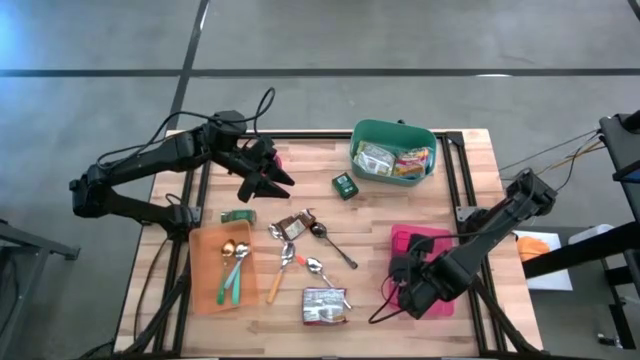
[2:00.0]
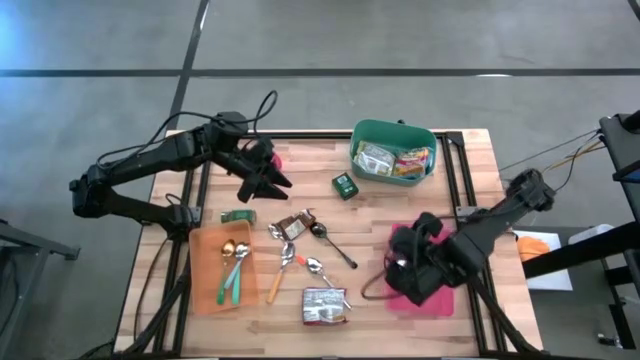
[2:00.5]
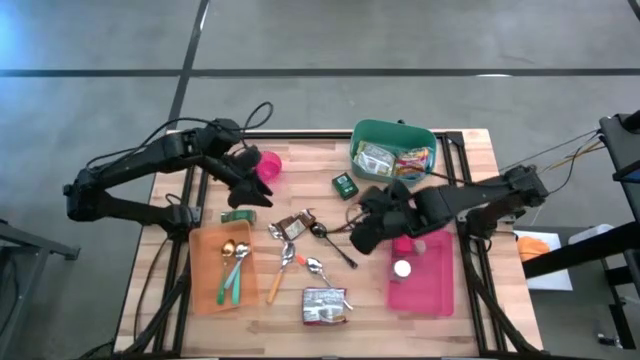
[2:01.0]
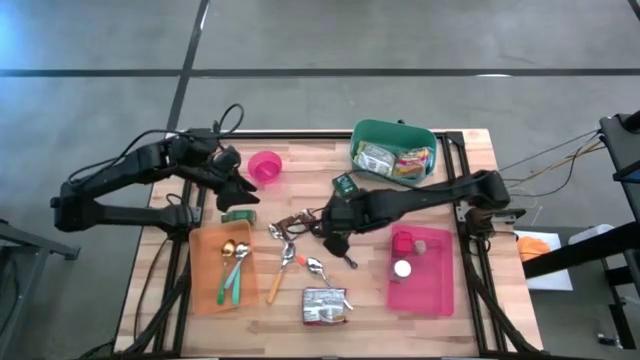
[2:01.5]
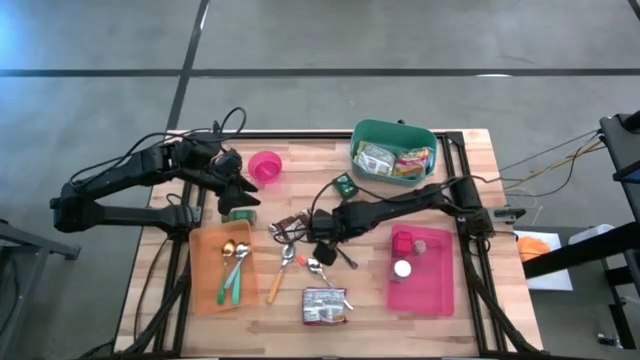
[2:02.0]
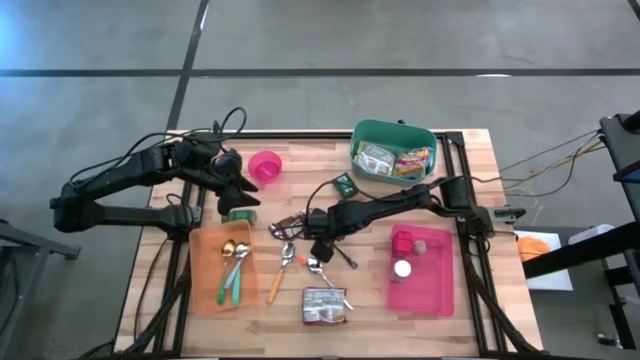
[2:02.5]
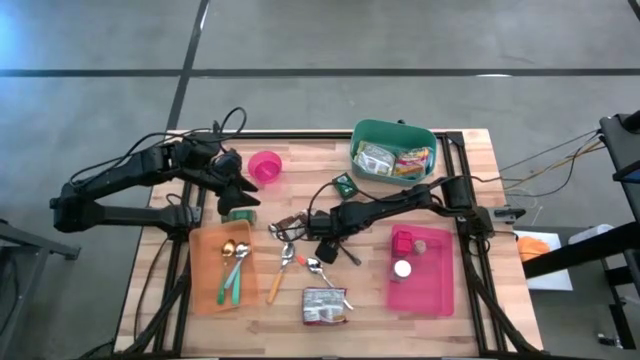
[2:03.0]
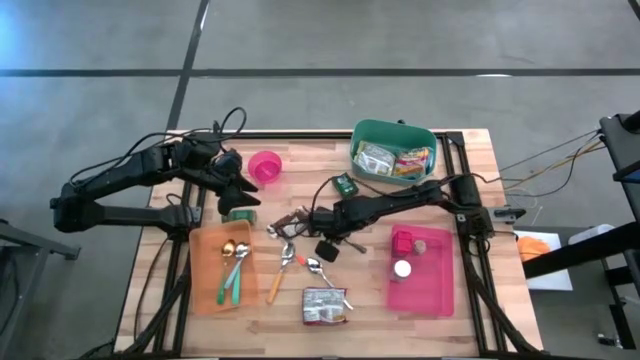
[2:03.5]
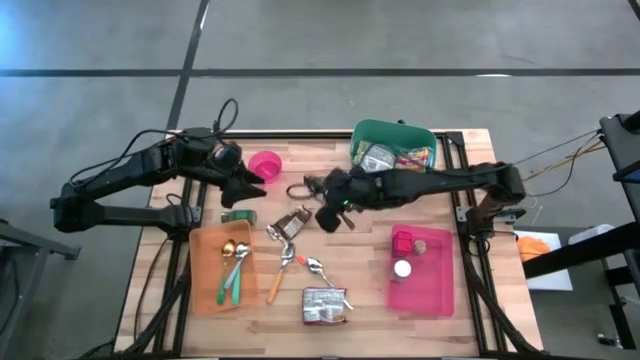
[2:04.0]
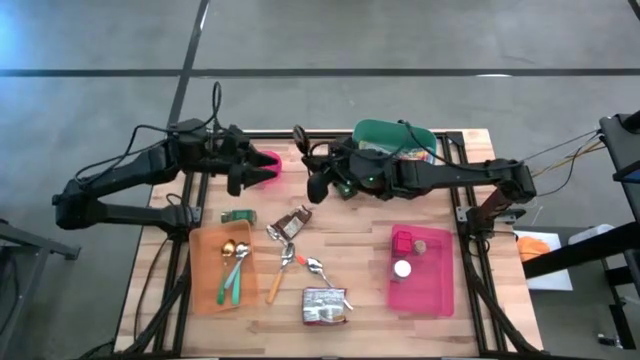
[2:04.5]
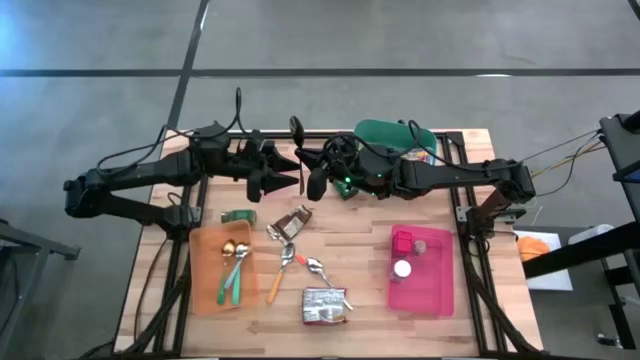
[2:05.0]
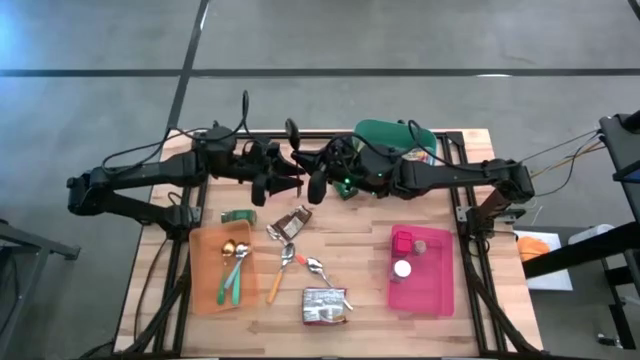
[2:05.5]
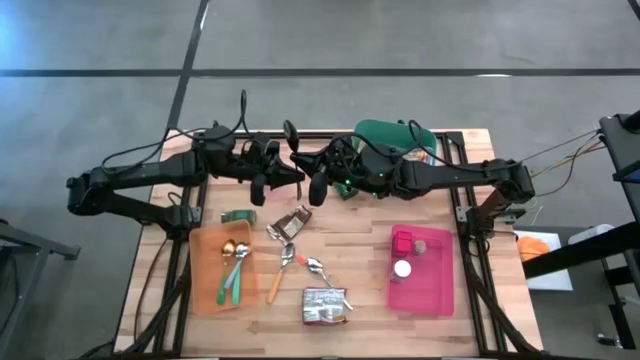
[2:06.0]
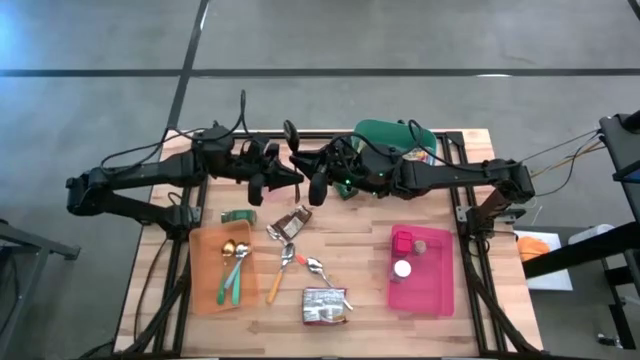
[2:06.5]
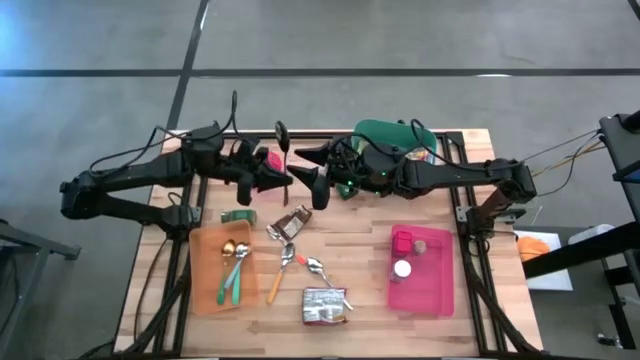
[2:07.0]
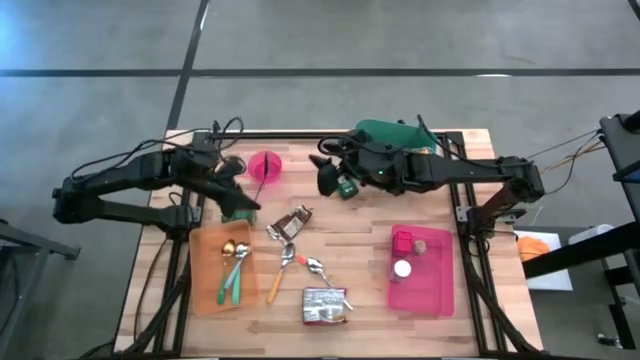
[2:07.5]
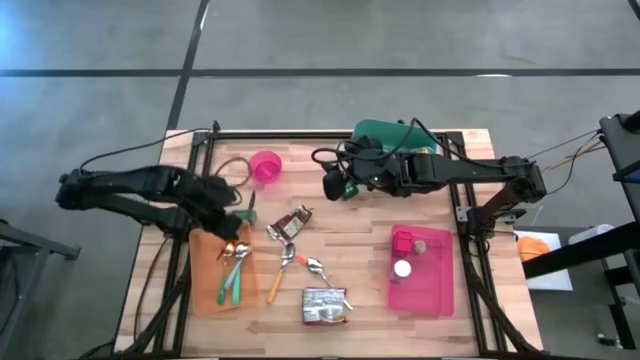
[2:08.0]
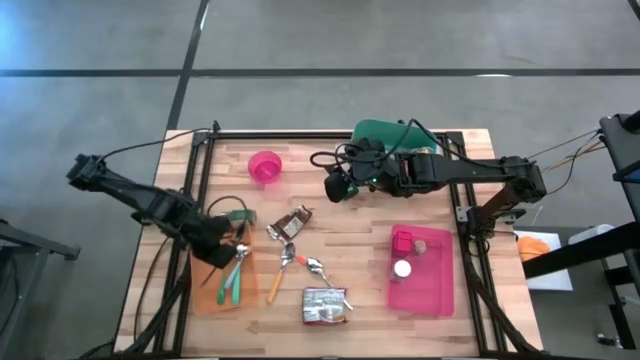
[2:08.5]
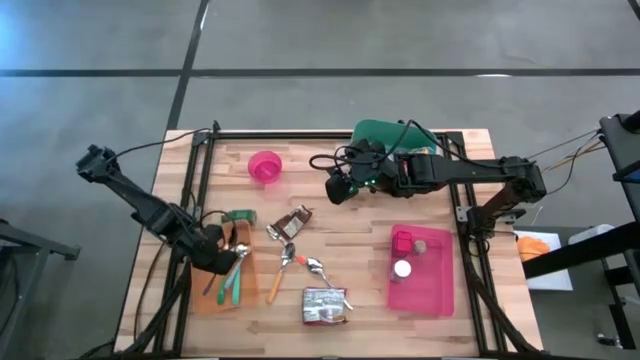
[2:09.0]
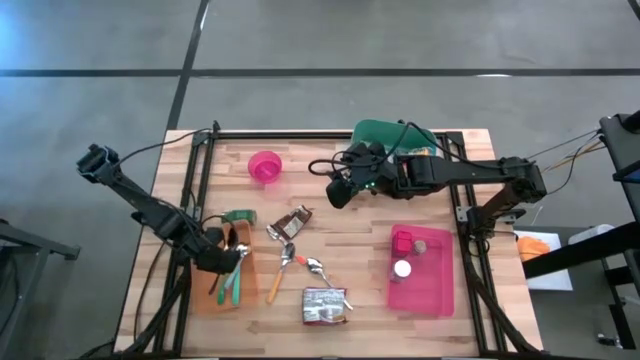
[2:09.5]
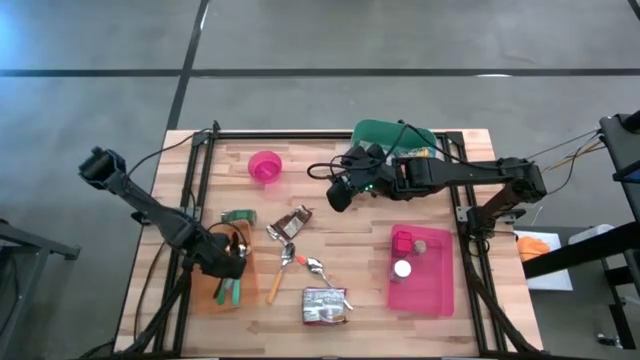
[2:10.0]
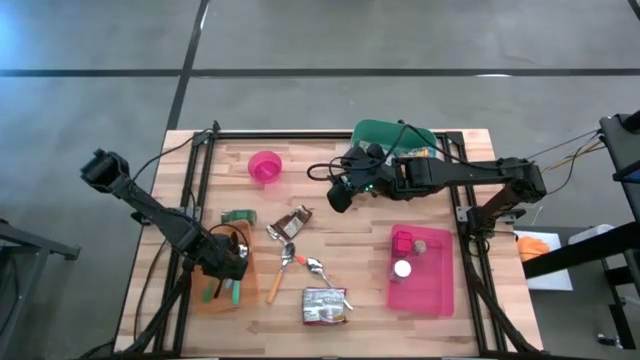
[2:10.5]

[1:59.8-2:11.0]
Task: Pick & Place Food Item
Put the black spoon into the orange bin
